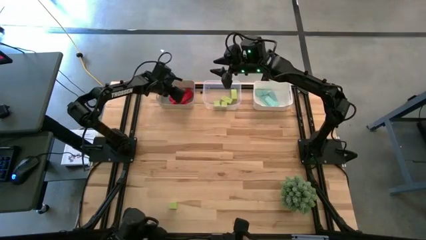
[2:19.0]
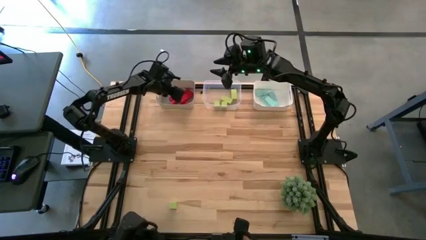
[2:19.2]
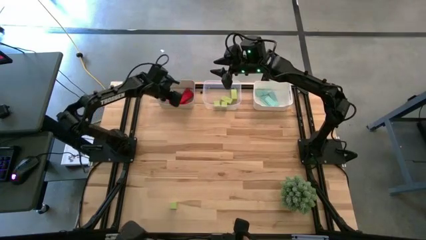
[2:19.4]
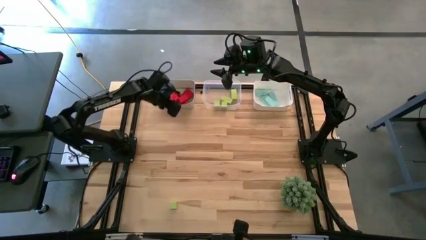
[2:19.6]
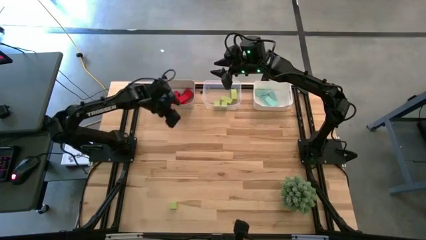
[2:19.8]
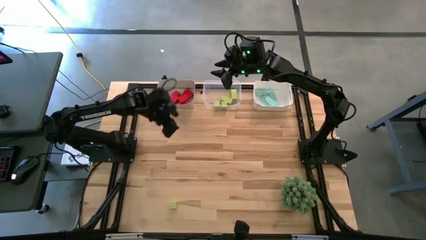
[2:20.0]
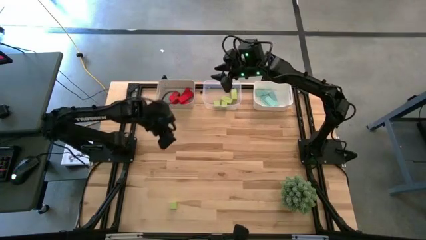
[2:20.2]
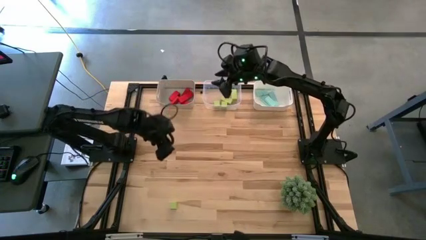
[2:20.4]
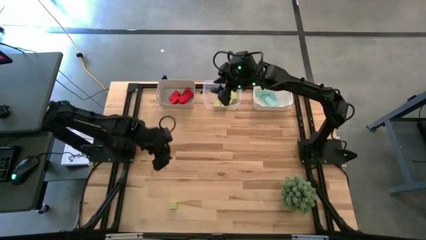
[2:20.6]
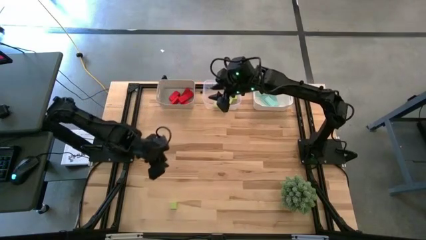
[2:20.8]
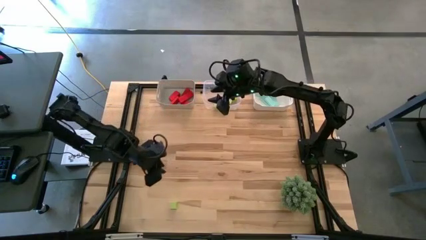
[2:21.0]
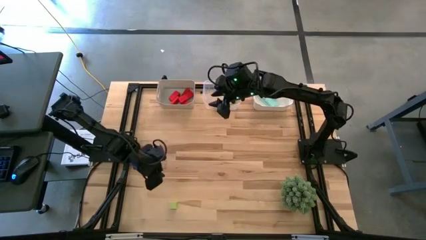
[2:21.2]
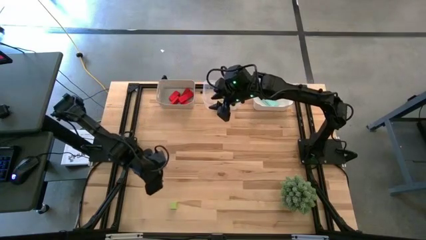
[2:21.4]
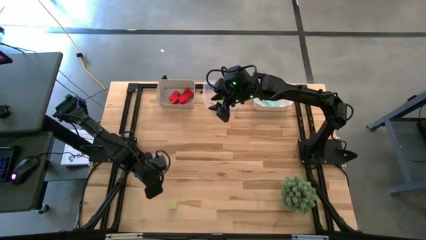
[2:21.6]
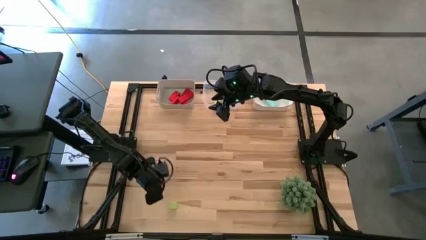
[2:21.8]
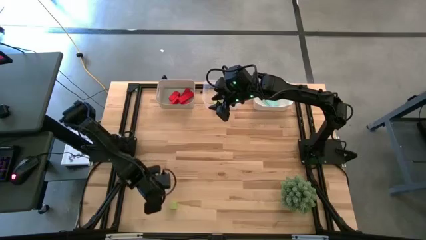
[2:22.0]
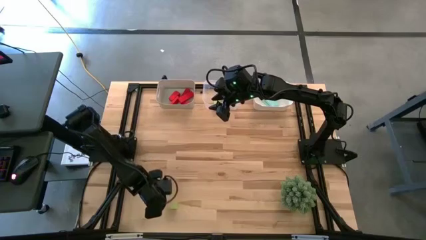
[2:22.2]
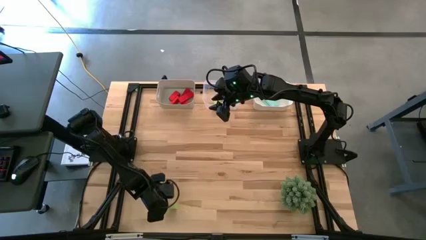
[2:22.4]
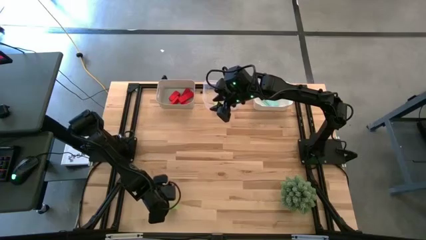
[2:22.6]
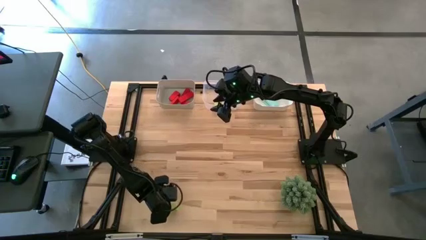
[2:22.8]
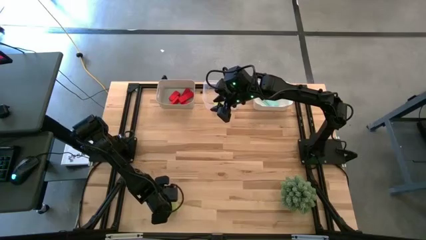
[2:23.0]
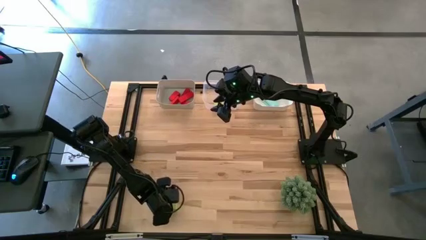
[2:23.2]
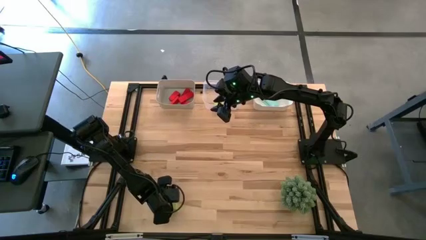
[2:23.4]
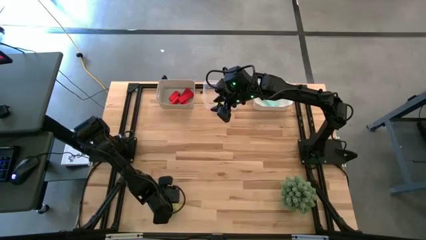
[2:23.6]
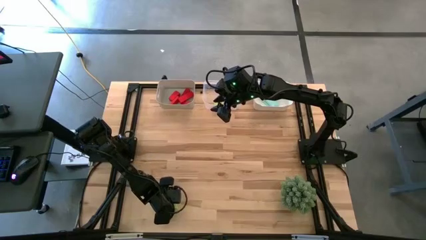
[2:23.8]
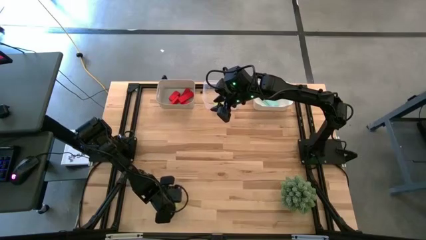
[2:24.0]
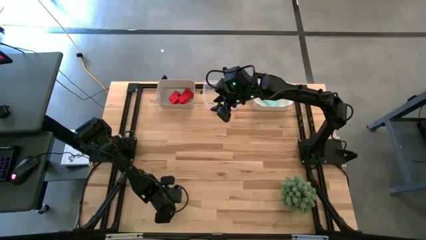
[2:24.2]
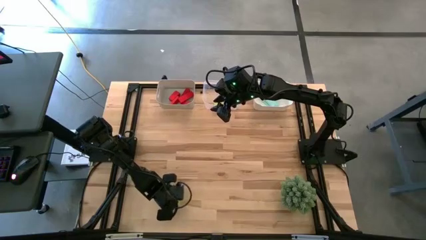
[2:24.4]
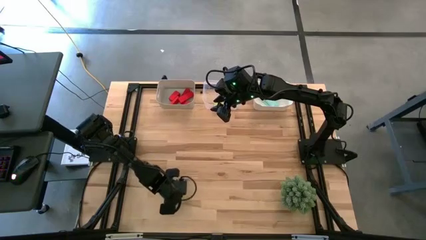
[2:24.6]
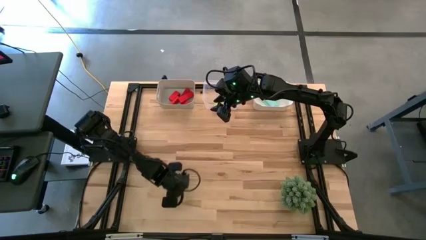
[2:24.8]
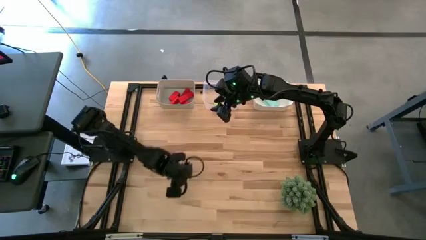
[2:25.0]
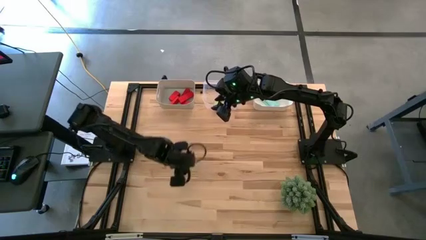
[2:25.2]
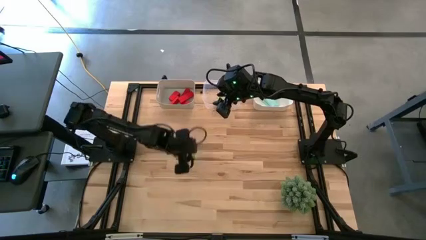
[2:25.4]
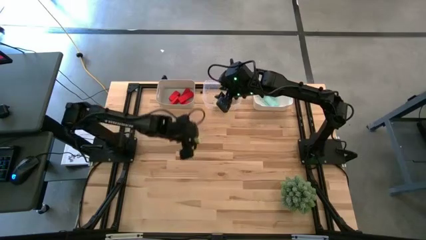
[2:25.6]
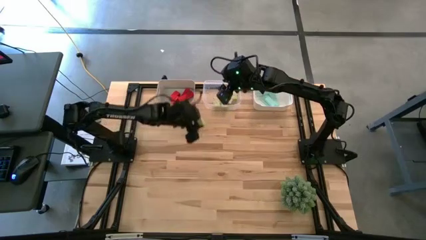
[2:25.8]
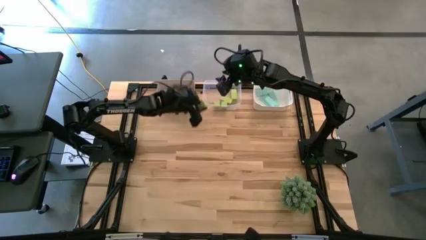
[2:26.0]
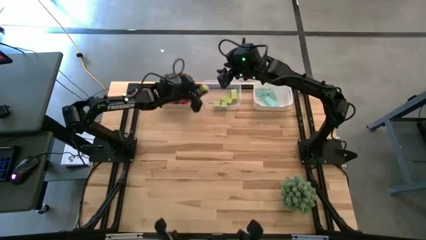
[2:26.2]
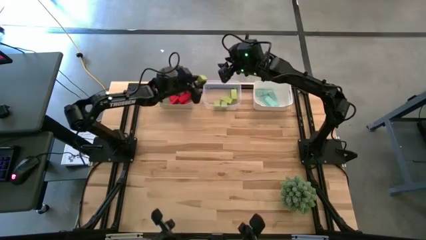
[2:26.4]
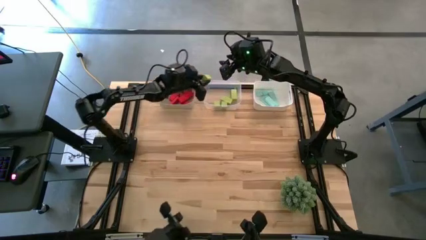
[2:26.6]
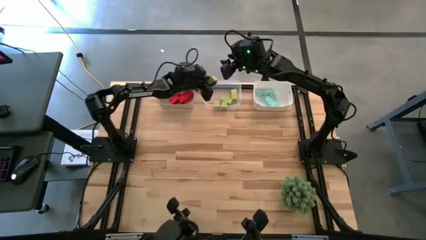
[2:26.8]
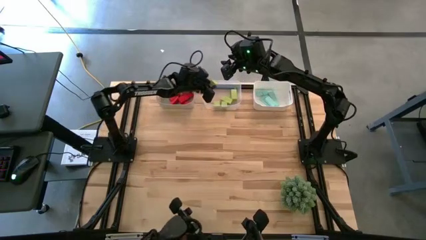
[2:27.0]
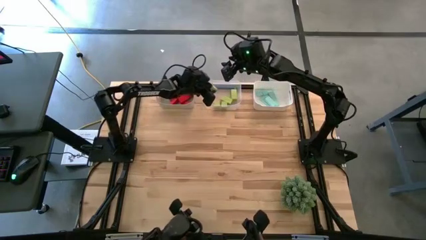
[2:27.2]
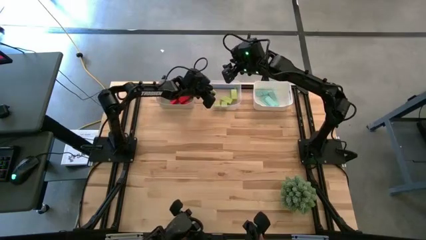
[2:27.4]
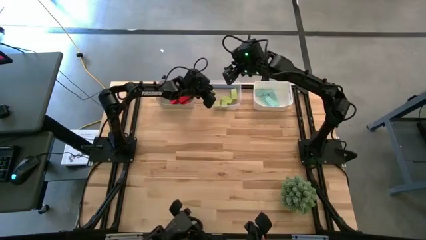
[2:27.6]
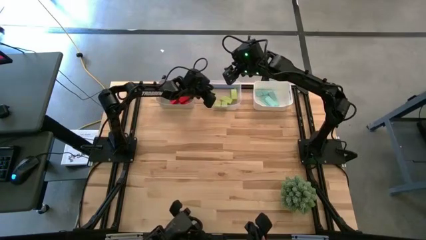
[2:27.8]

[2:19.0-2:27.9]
Task: Sort & place blocks by color
Put the green block into the transparent bin

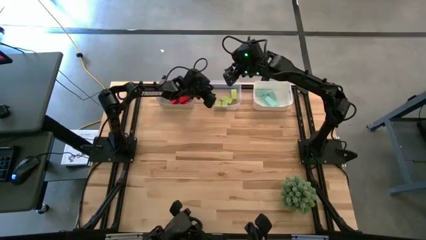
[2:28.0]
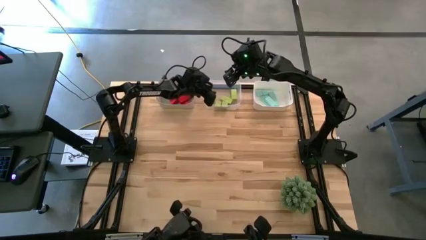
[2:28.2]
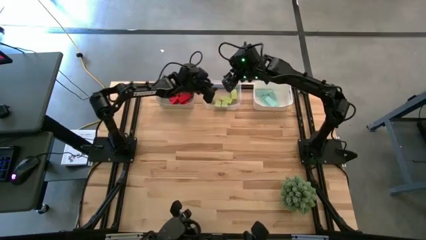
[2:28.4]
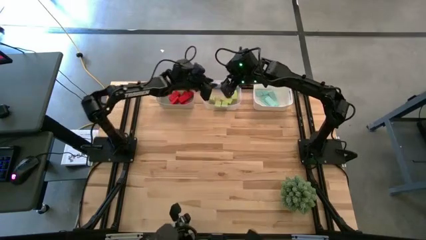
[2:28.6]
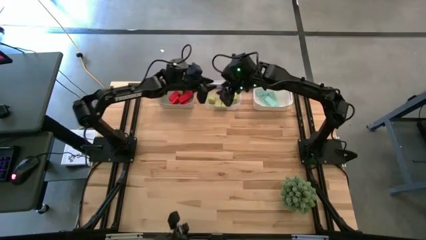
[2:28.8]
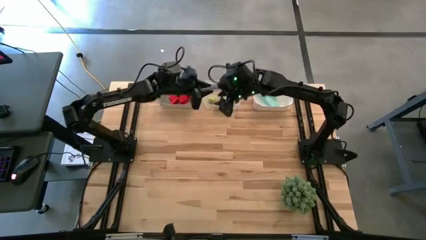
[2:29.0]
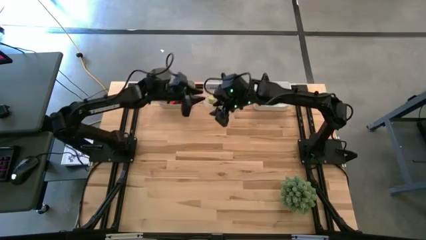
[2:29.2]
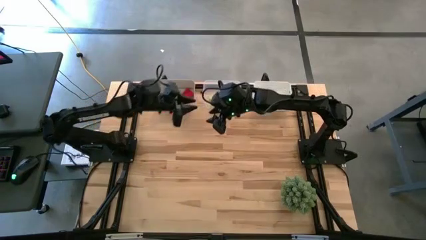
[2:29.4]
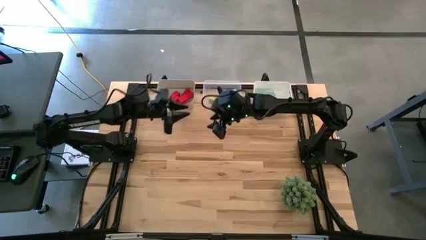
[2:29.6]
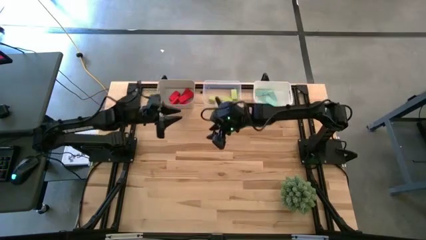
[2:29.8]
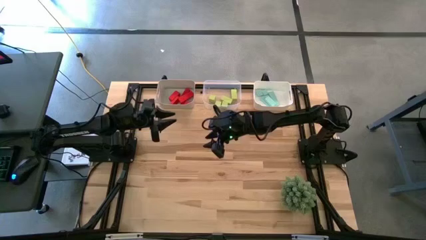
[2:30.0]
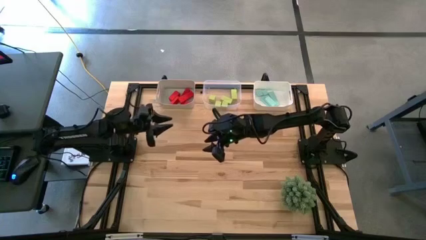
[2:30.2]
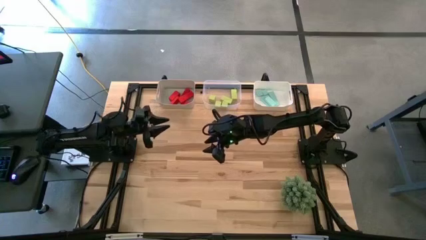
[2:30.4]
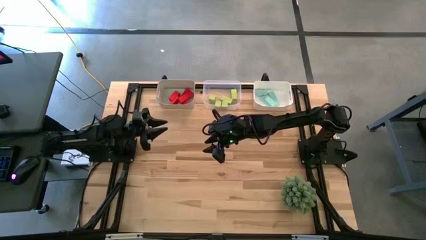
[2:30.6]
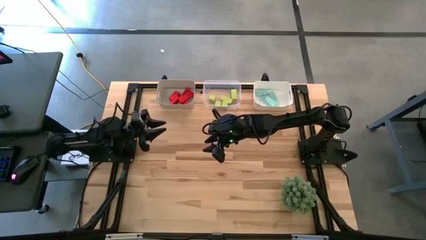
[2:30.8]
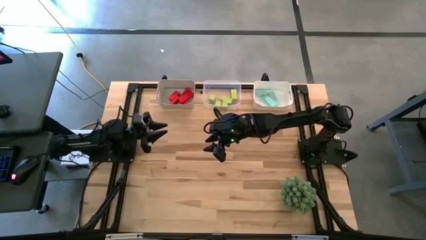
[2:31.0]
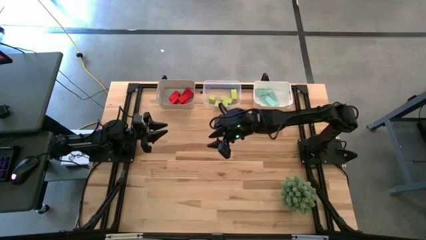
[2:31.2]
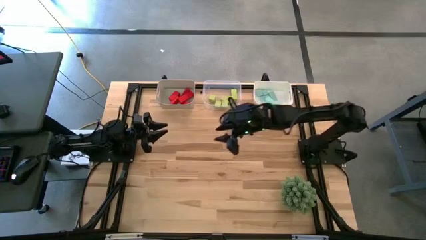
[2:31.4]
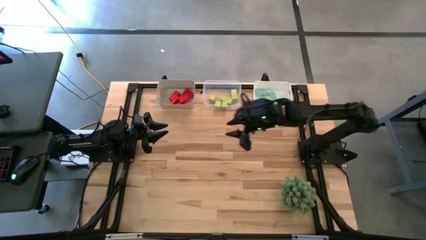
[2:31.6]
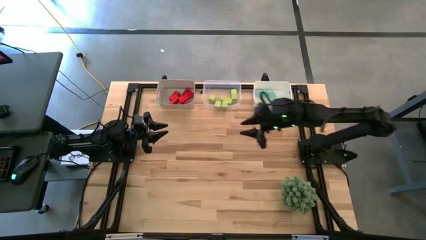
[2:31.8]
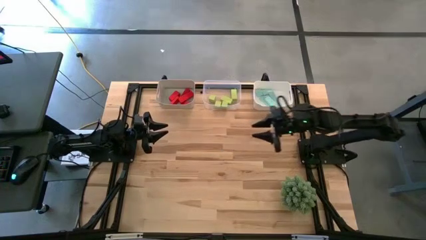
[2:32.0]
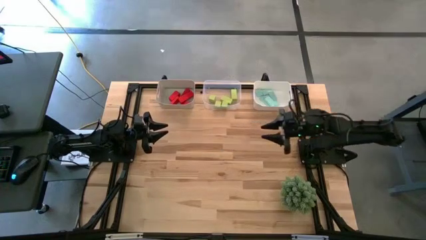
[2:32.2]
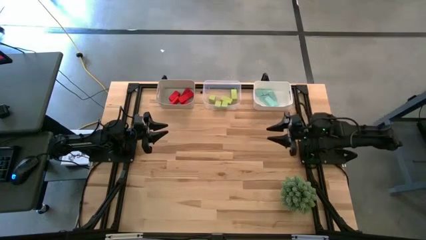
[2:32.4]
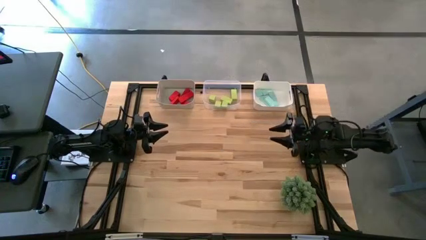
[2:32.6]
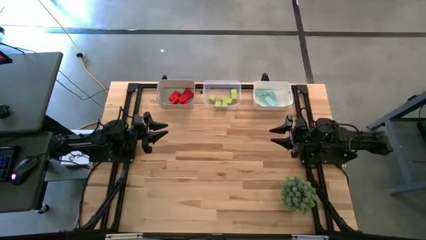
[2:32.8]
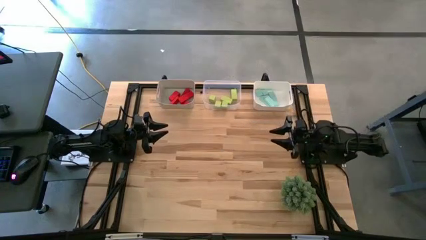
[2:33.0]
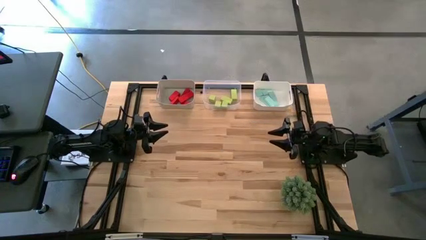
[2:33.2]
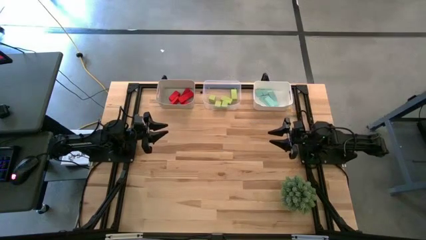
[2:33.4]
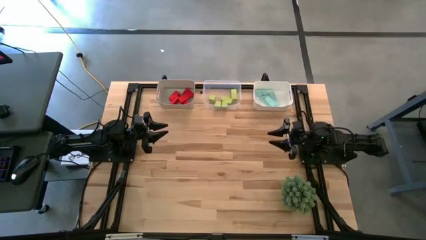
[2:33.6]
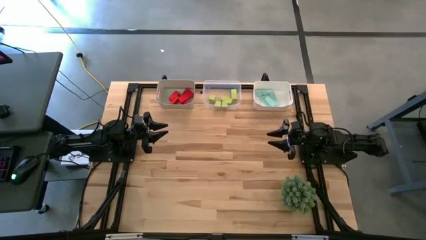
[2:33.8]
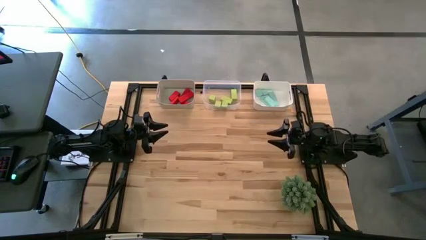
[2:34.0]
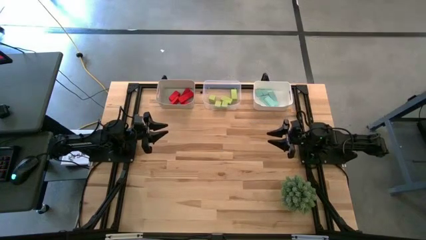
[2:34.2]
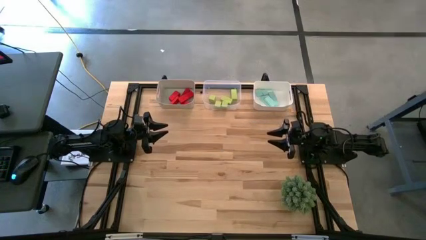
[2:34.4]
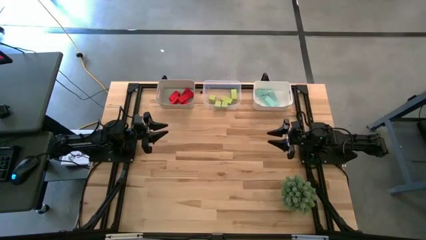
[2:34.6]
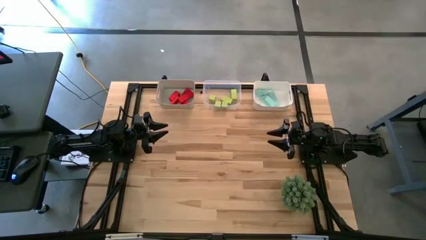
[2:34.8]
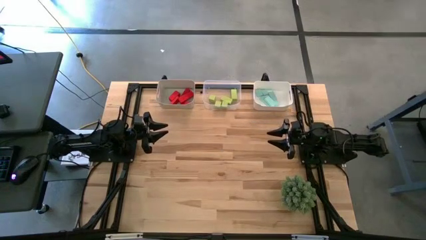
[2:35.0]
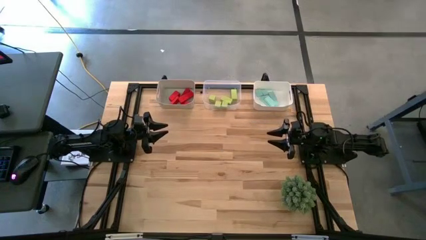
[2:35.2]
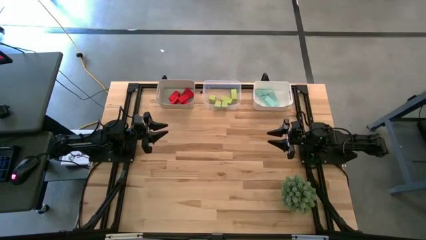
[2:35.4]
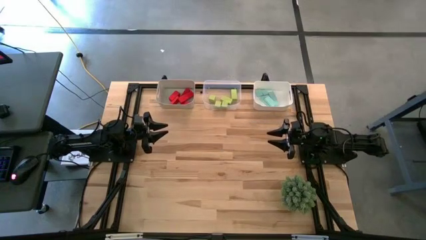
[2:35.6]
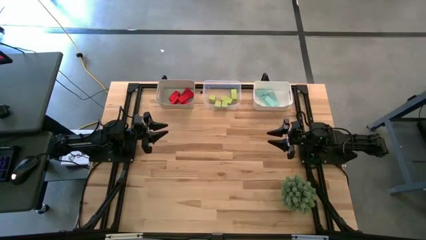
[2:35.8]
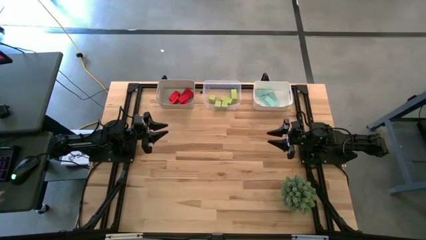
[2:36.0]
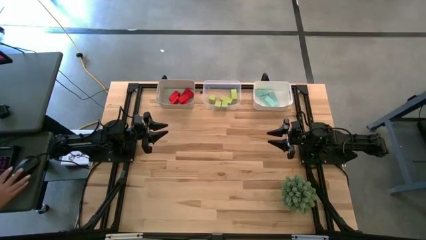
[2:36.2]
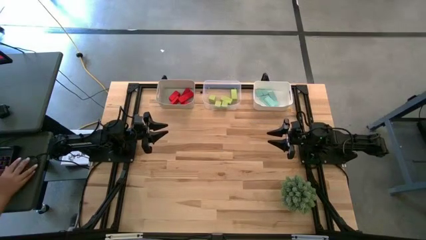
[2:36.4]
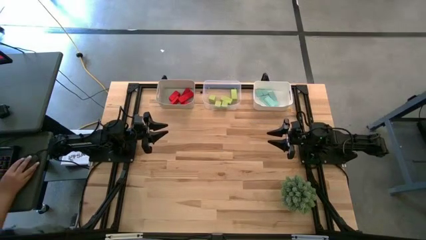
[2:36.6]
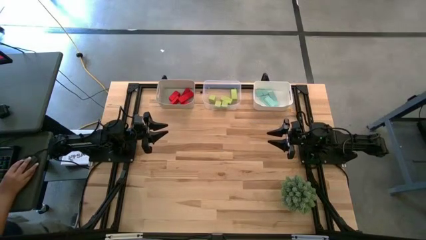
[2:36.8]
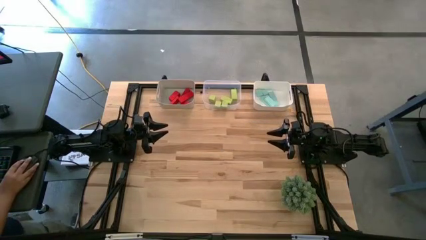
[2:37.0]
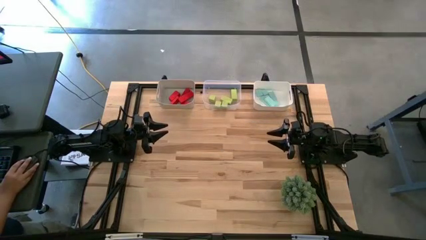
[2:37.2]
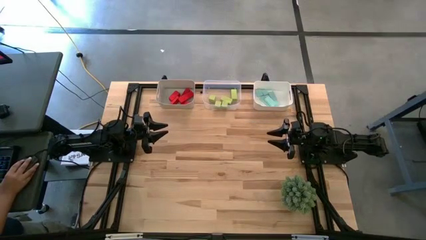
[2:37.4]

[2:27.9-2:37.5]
Return to Home Position
